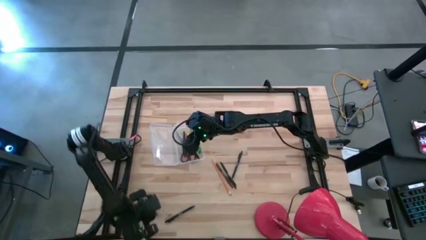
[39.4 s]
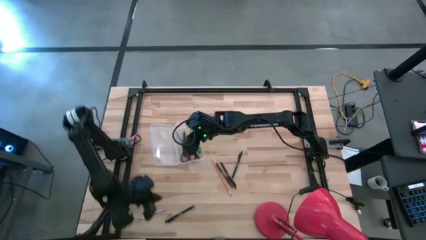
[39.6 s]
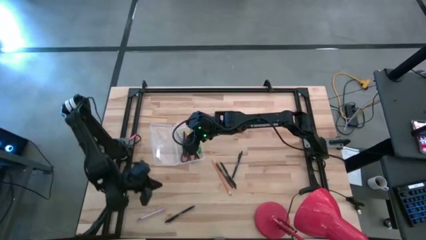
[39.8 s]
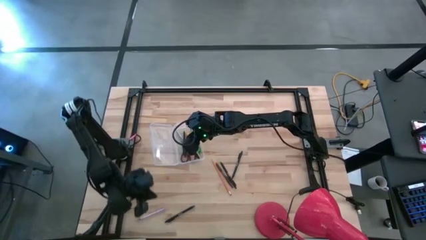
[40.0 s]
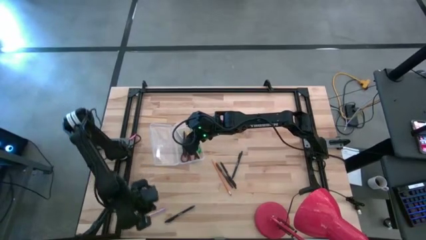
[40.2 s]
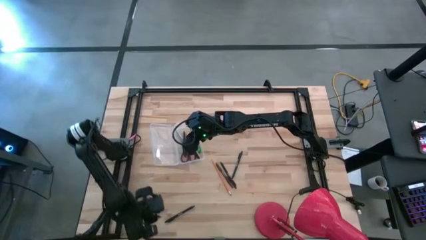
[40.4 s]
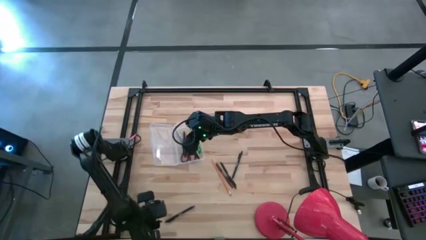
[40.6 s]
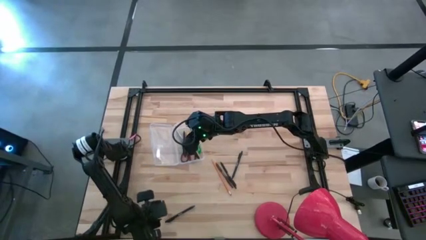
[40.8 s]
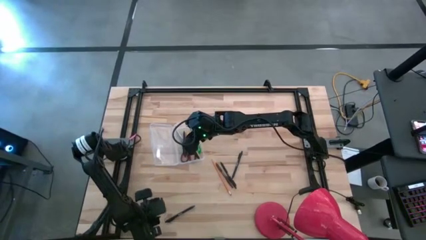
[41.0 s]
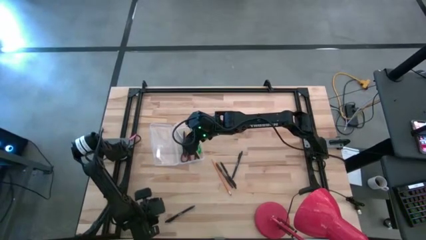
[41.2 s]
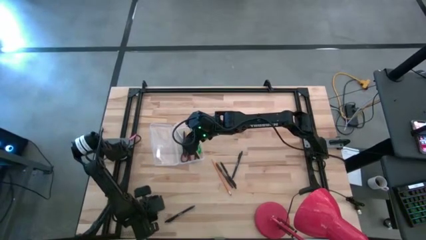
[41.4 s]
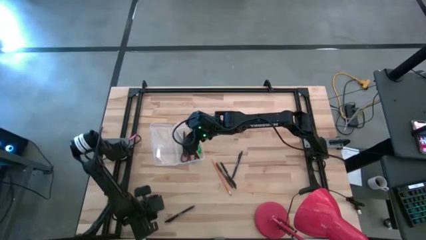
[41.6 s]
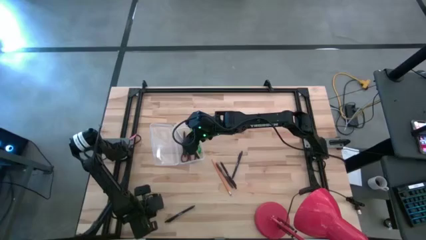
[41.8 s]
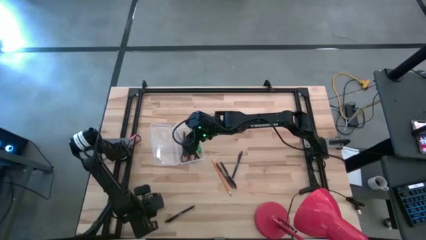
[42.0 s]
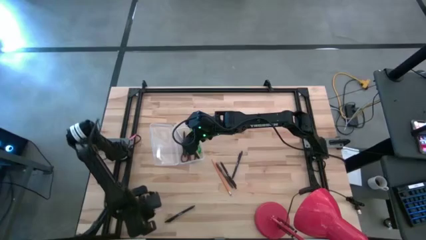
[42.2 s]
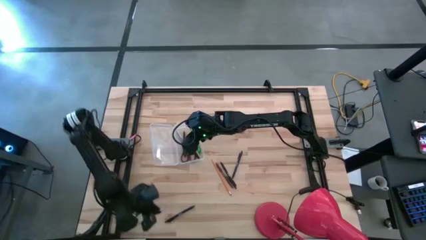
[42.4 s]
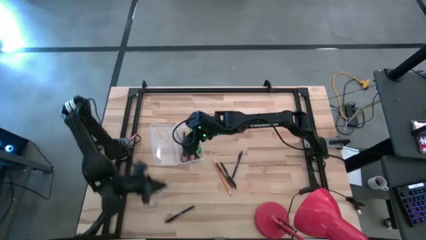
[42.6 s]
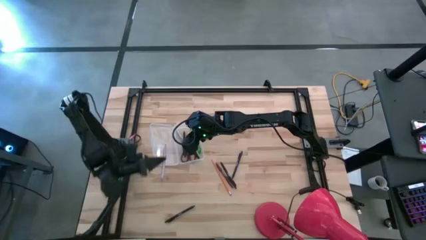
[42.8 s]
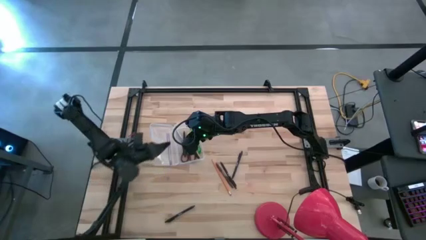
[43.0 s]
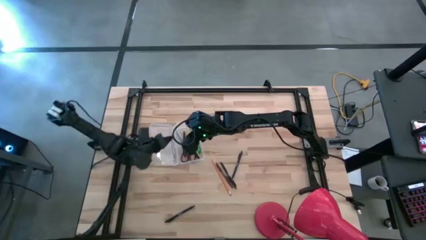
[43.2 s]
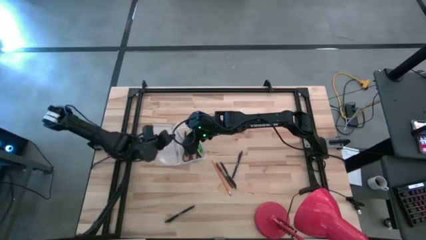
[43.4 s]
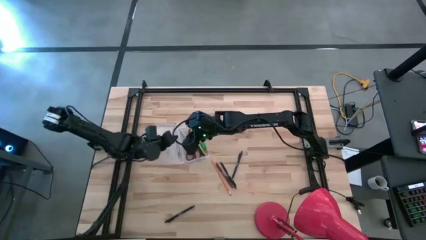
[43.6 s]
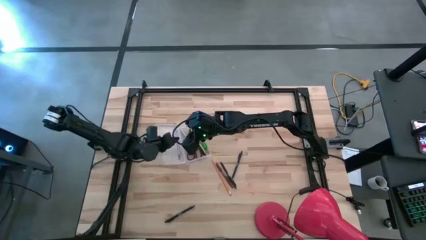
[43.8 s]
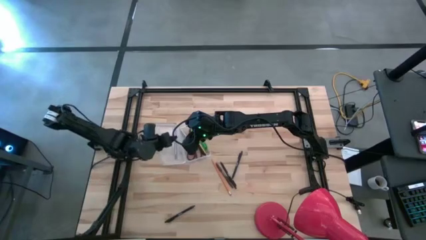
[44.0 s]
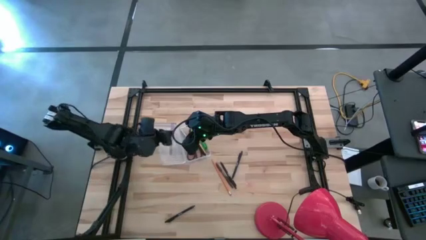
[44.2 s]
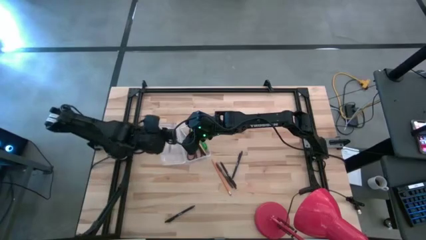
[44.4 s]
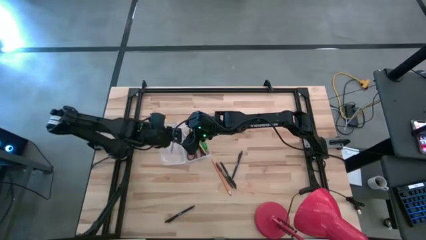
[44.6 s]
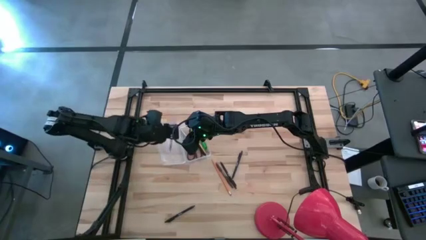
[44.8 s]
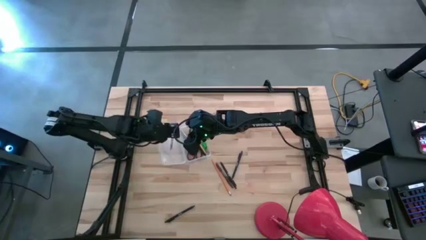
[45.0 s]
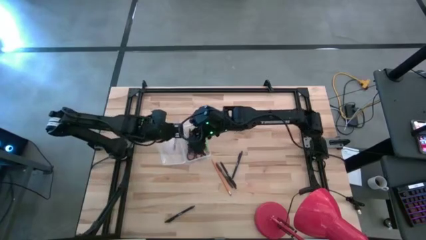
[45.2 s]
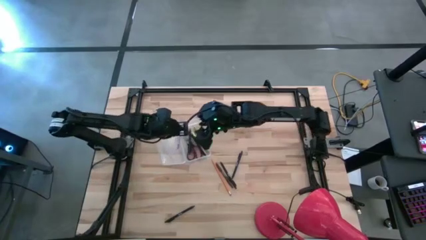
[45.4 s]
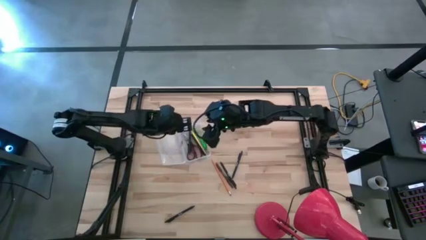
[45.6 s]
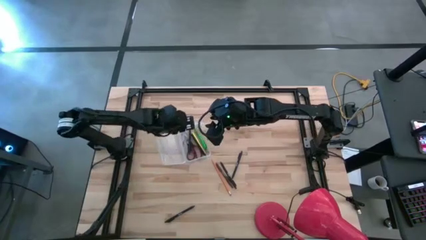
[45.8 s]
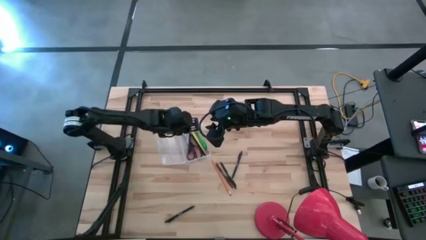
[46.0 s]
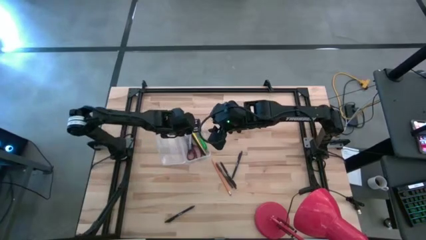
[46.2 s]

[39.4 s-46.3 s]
Task: Pick & place school supplies into a supply box
Put the violet pen into the transparent supply box

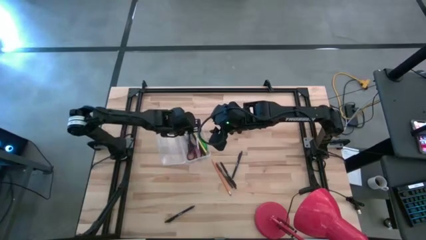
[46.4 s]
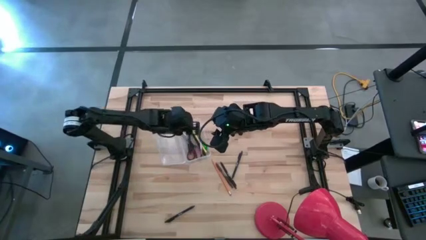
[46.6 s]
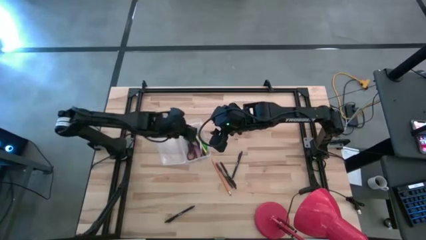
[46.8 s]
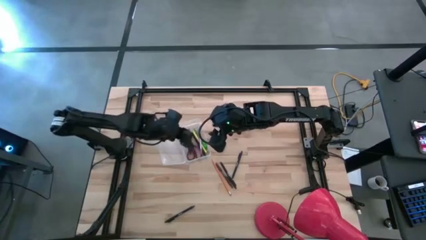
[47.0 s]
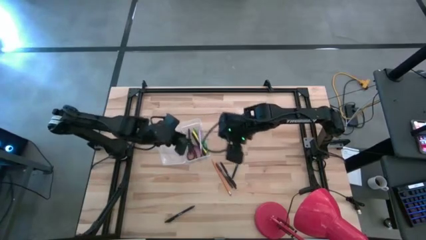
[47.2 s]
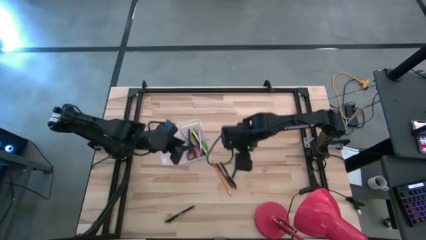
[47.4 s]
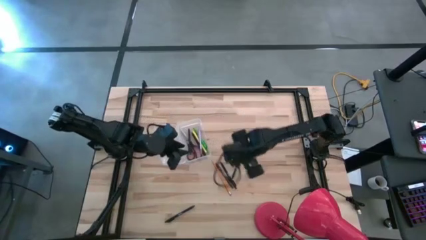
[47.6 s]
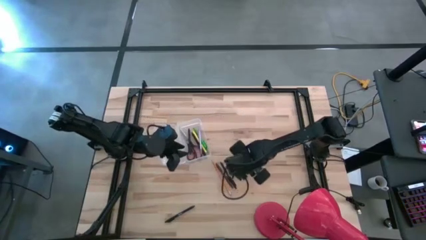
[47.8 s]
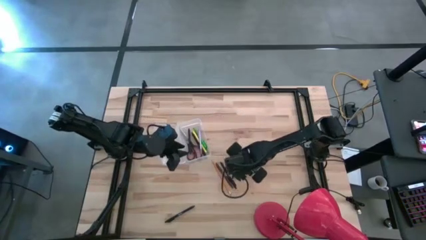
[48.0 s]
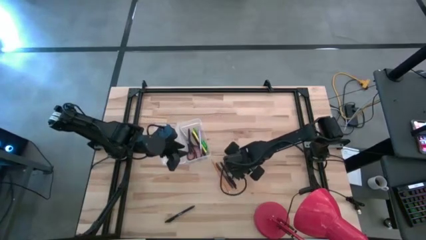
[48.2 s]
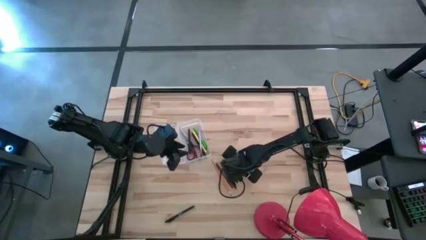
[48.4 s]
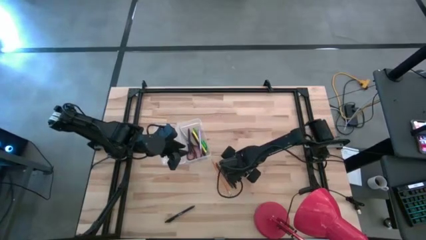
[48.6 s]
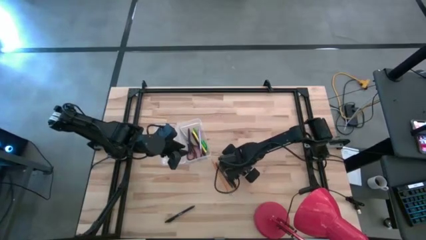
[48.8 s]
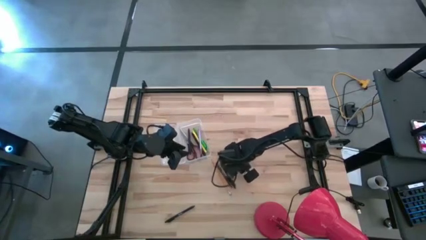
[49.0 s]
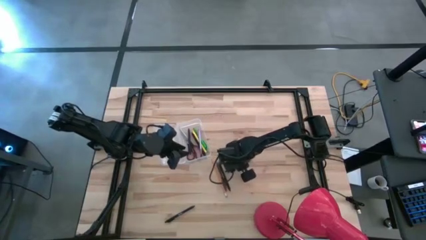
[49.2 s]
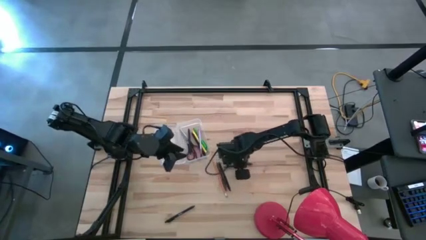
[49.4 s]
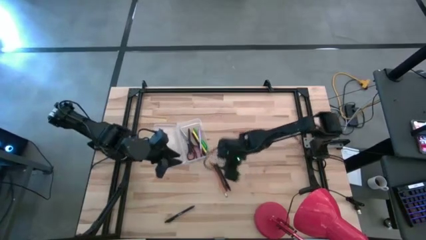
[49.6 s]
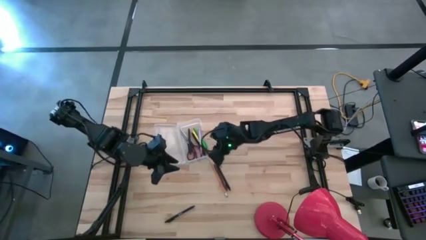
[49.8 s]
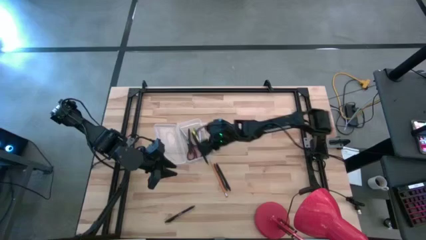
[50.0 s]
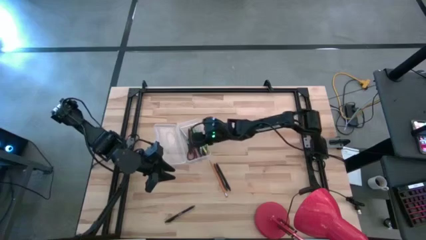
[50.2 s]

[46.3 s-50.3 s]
Put the black pen into the transparent supply box

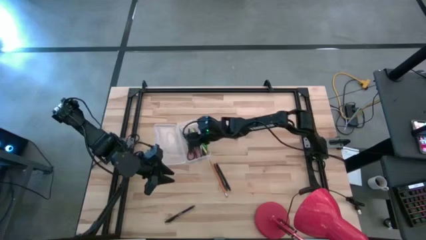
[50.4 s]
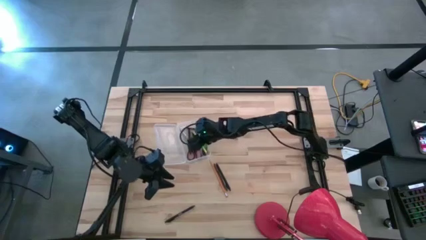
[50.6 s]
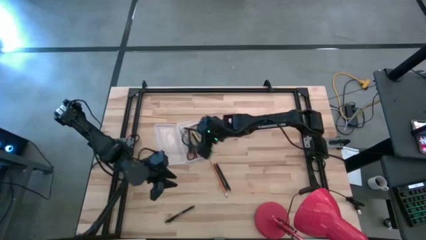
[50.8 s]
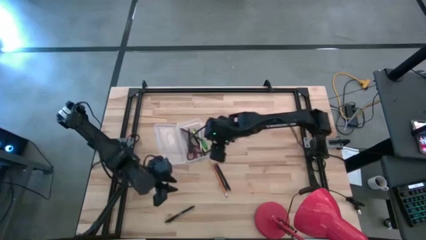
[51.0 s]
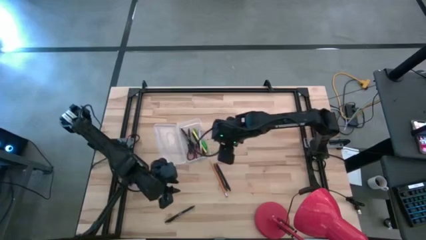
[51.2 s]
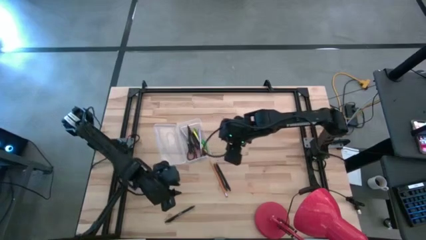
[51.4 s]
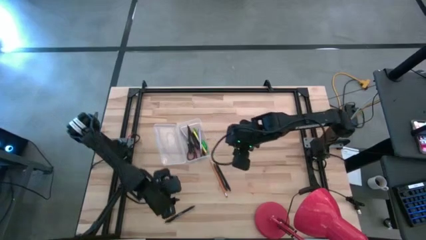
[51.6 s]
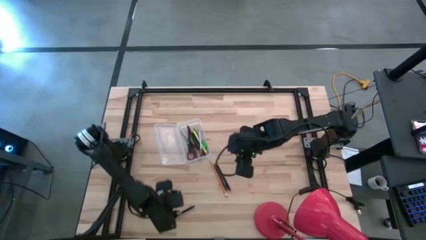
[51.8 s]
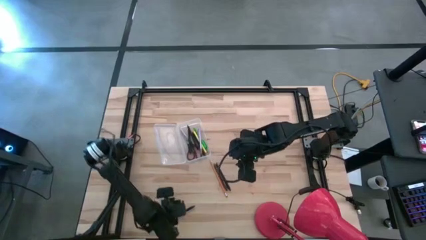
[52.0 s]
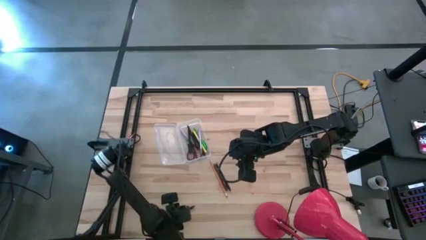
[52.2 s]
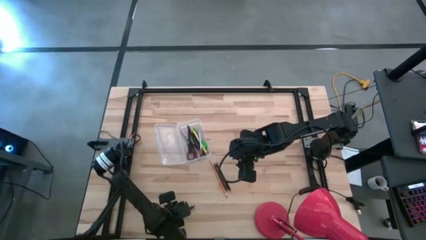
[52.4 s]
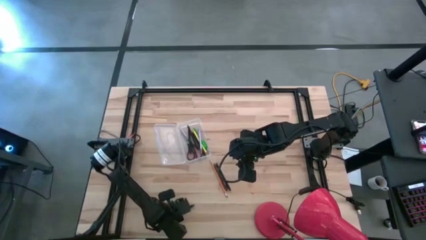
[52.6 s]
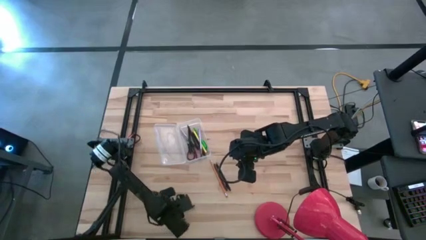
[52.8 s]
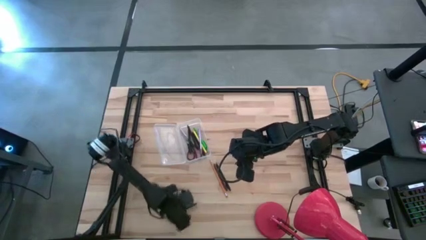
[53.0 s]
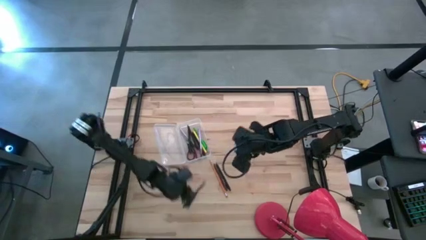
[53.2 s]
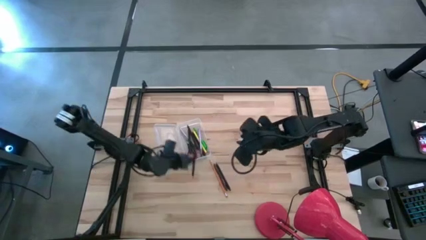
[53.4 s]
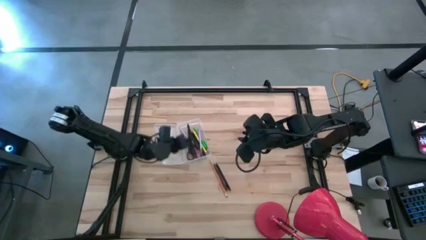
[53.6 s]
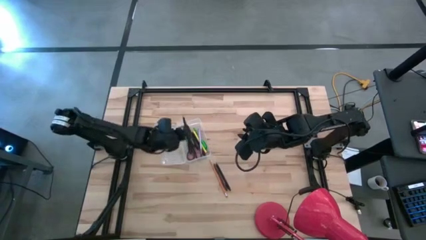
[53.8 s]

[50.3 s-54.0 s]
Put the black pen into the transparent supply box

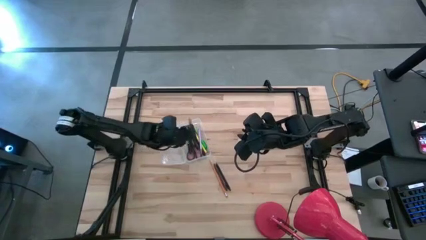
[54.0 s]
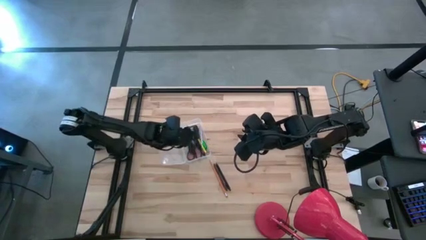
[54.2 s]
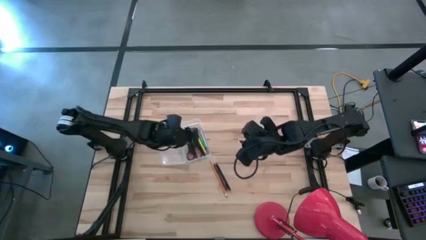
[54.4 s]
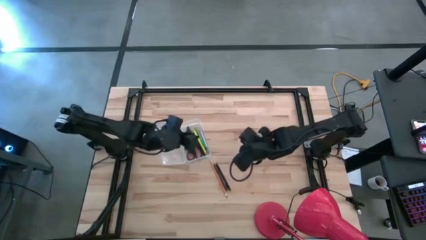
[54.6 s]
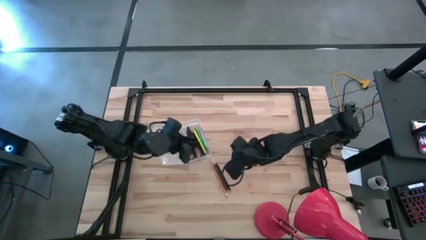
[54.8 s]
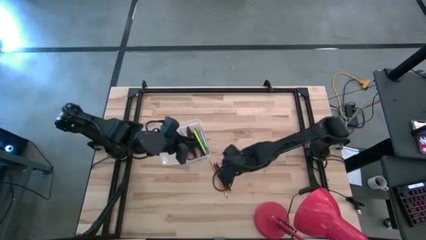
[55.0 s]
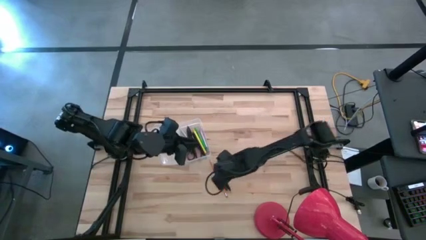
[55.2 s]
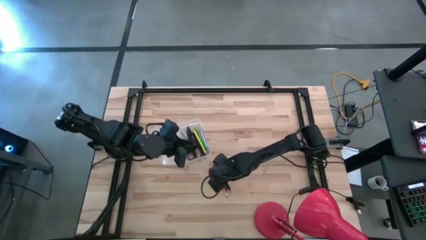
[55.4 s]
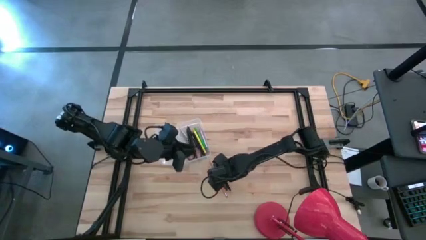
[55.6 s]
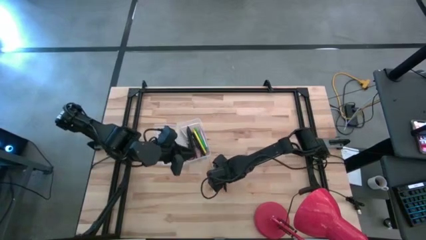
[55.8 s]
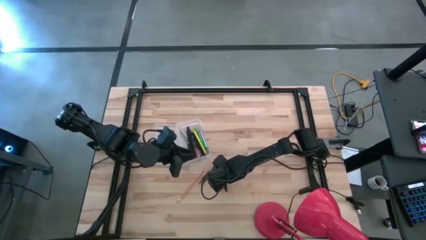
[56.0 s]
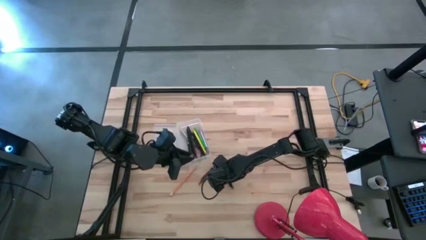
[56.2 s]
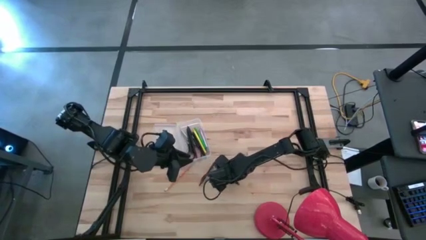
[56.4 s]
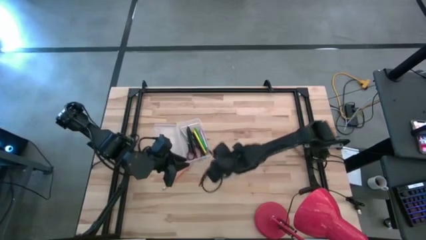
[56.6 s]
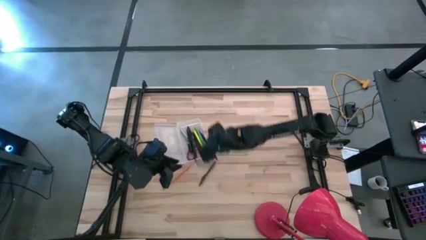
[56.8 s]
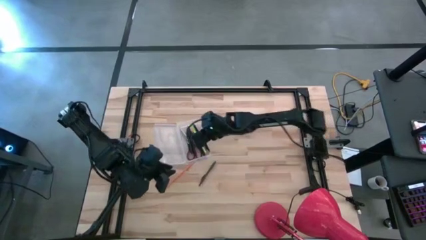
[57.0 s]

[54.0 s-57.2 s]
Put the black pen into the transparent supply box
